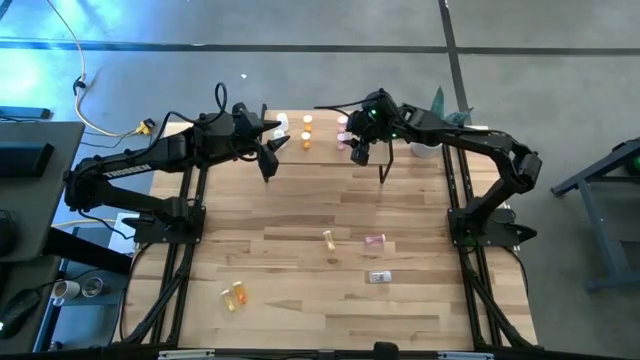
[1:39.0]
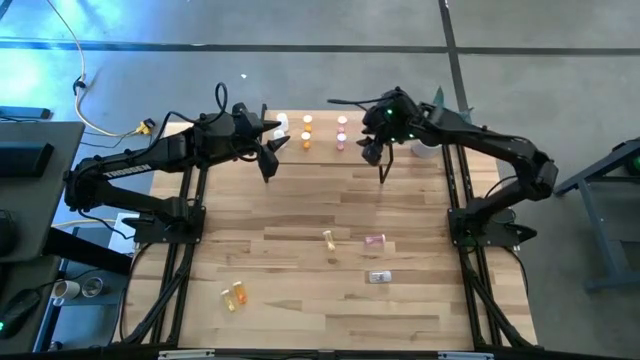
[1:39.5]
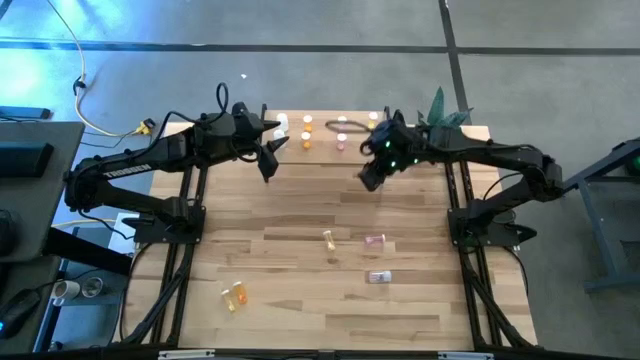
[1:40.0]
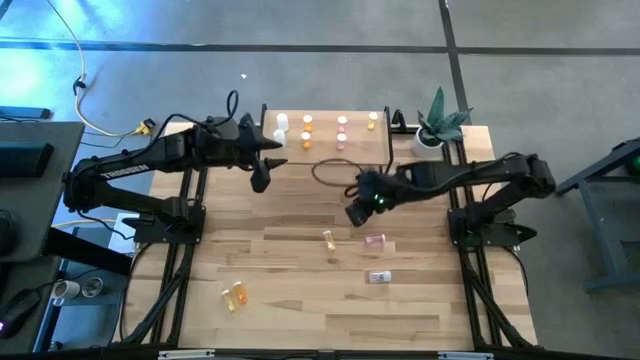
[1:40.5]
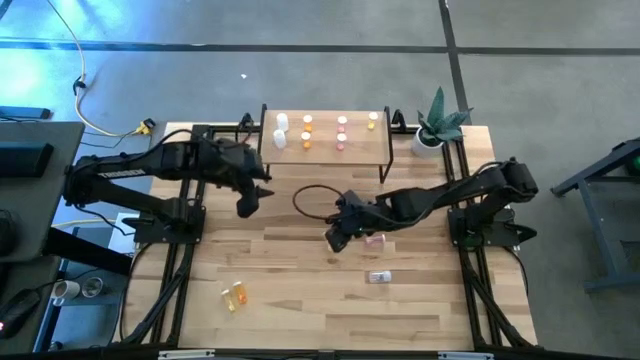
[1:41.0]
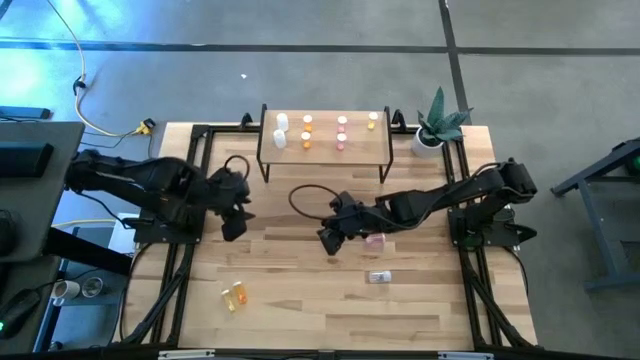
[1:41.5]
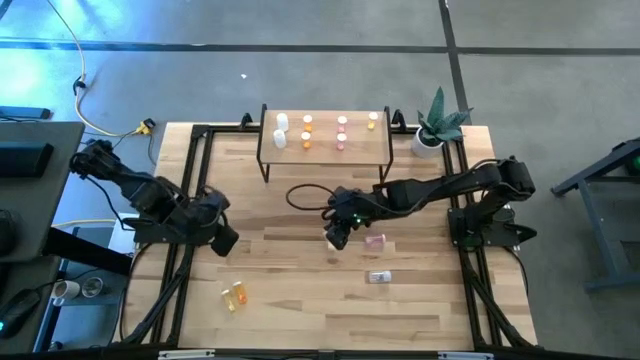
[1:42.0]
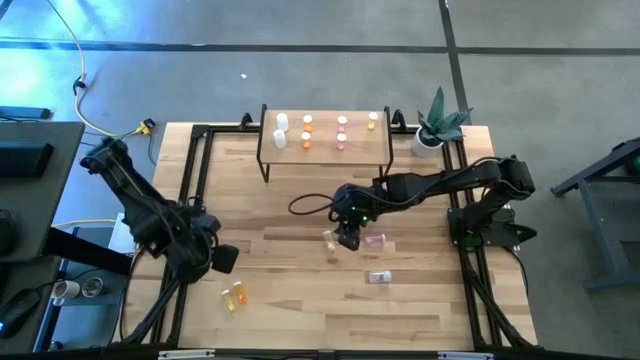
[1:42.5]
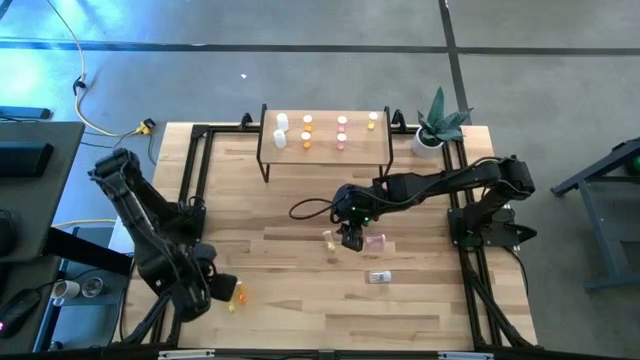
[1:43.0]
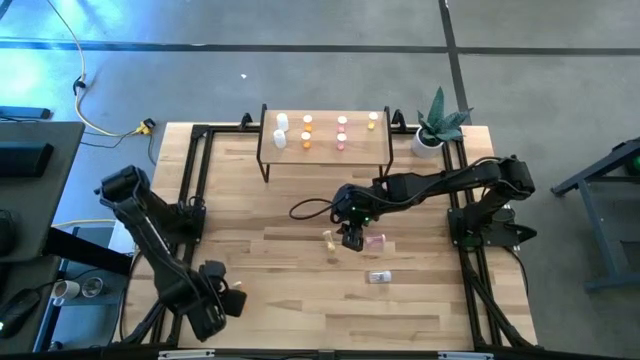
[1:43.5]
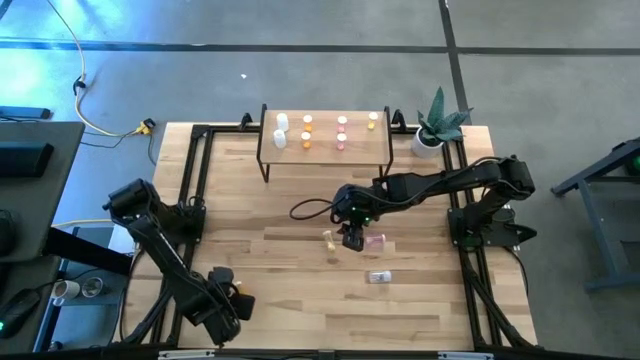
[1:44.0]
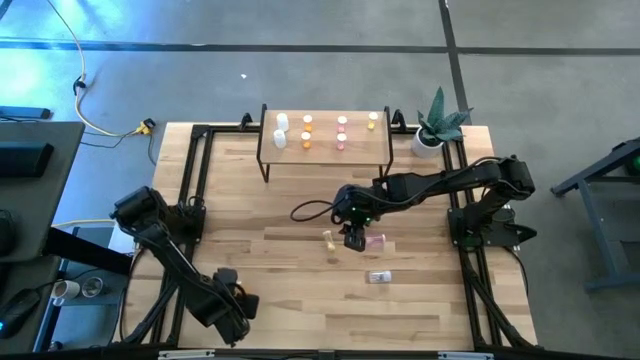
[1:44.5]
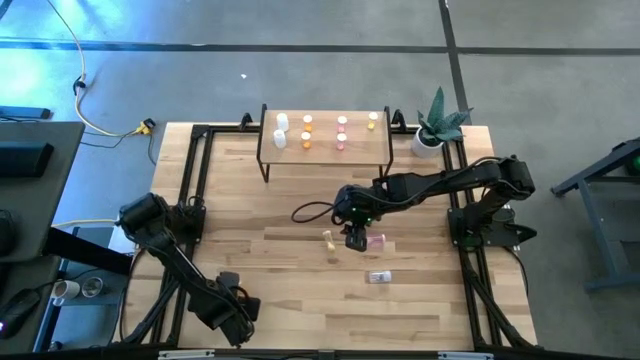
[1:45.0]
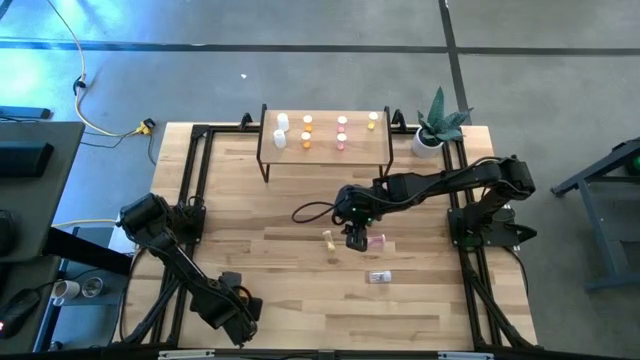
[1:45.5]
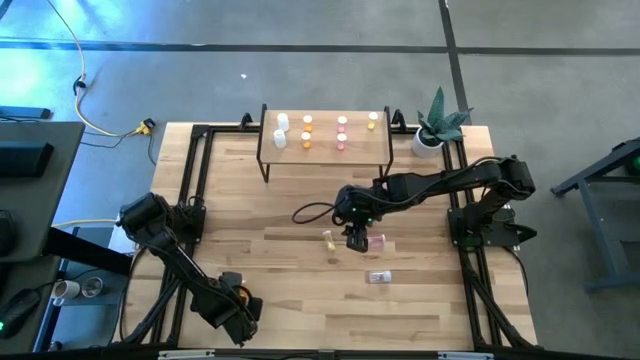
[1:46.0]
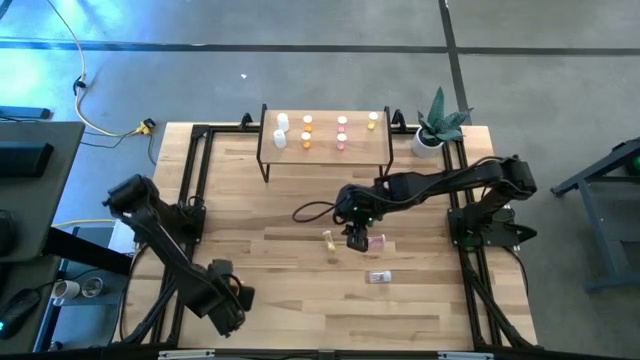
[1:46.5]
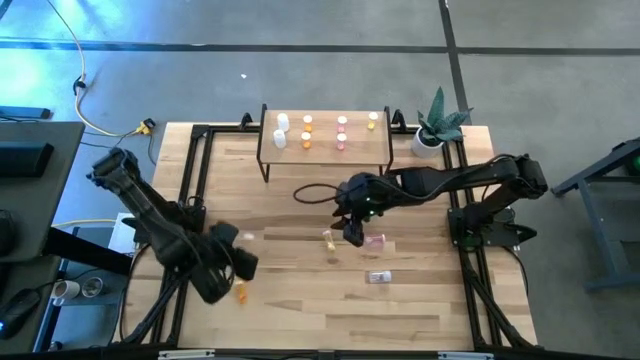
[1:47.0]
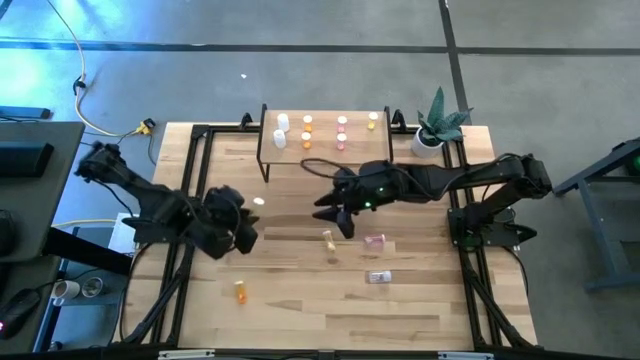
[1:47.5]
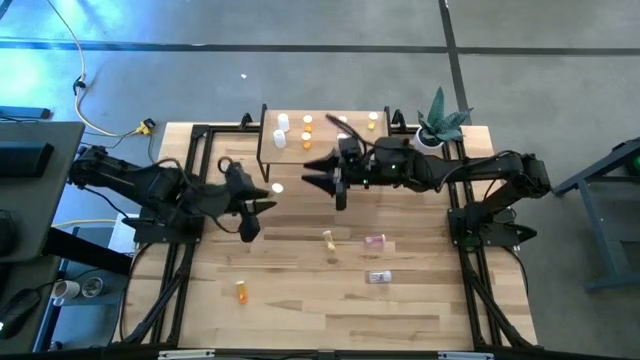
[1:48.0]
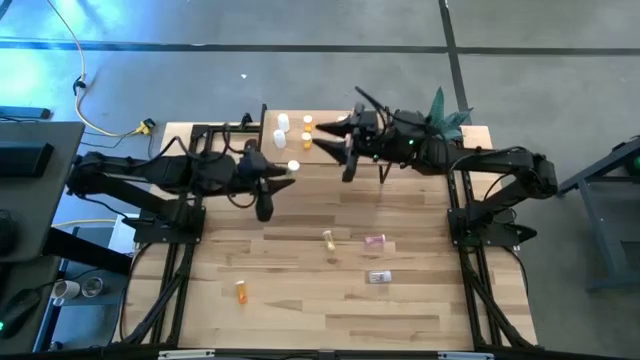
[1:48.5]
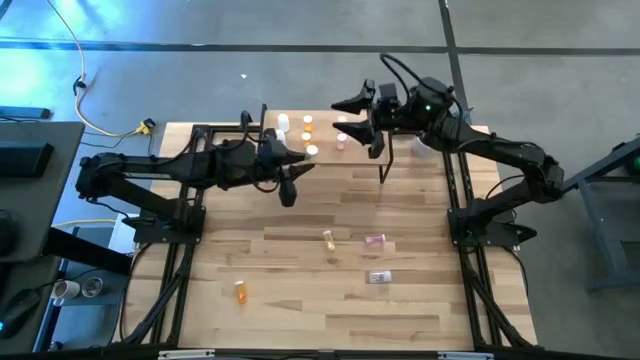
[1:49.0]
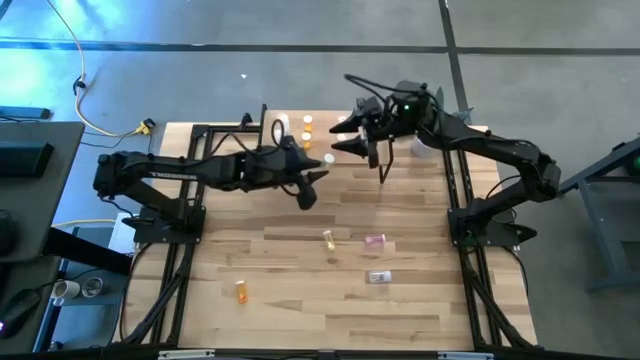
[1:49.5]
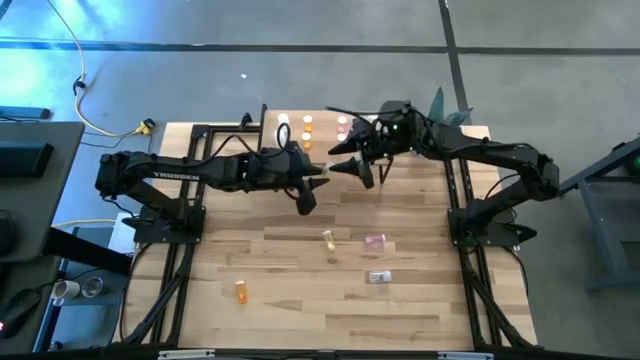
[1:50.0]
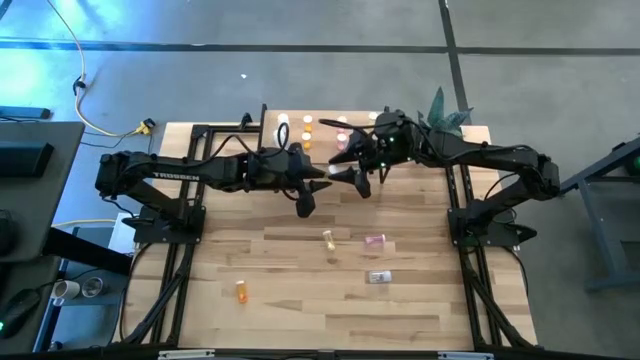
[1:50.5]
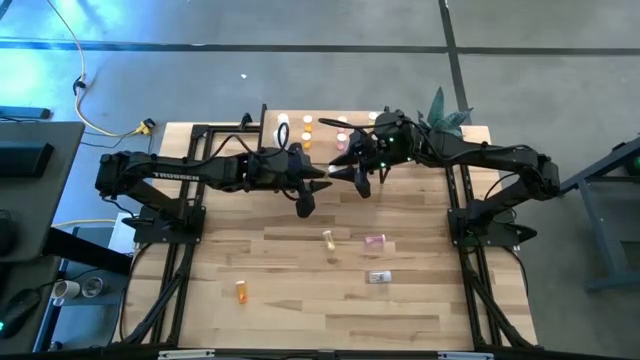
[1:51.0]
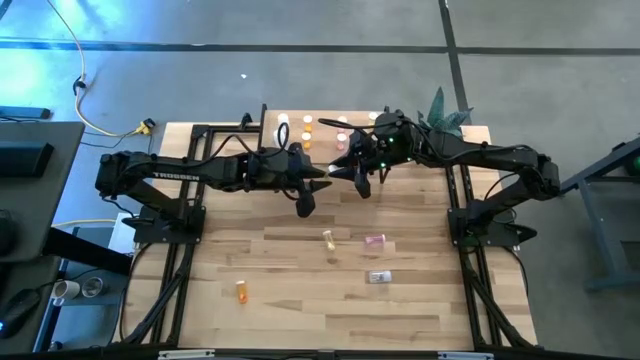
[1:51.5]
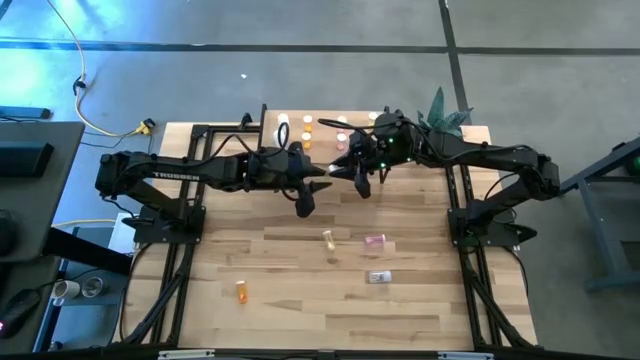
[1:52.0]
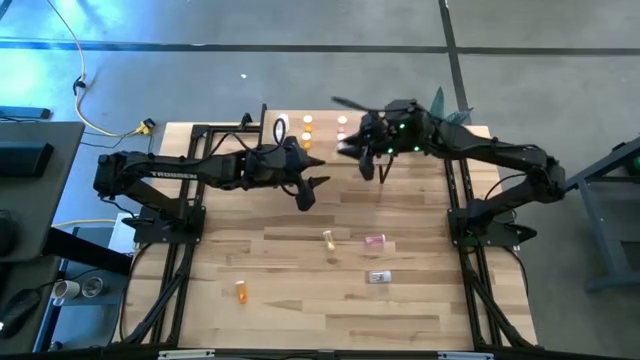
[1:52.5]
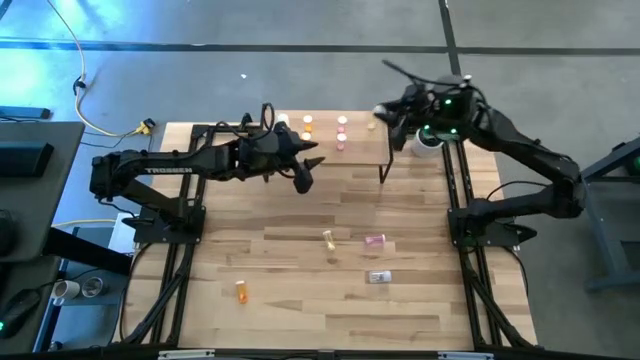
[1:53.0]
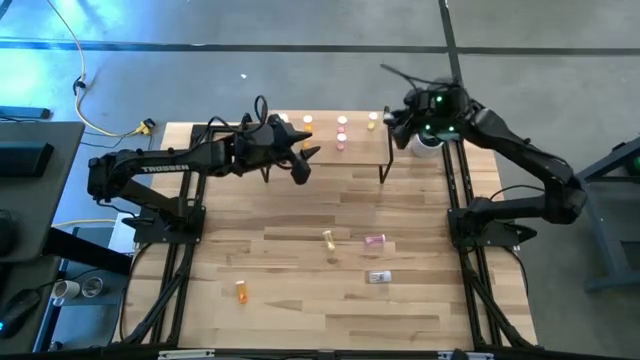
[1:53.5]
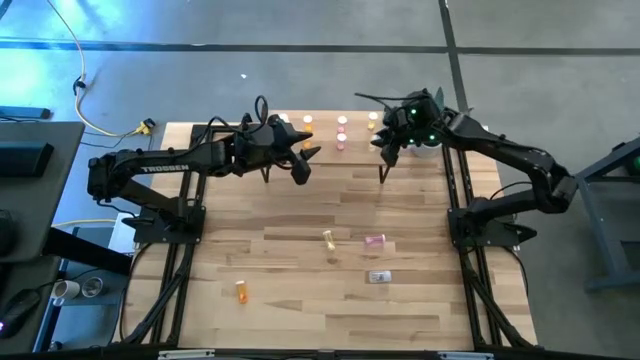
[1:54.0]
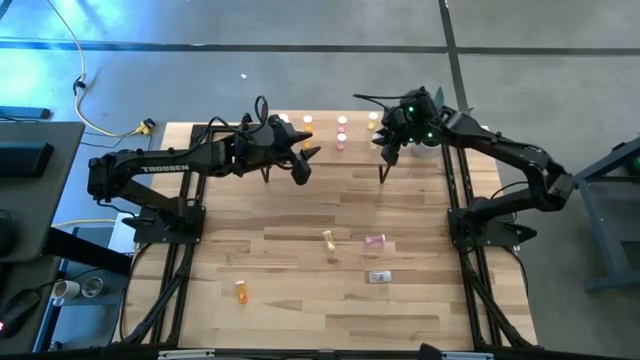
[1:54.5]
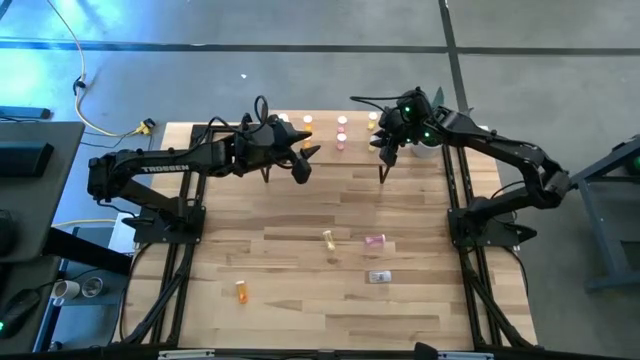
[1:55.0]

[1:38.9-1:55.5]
Task: Pick and place medicine bottles onto shelf by color
Put the bottom yellow pill bottle aligned with the other yellow pill bottle on the shelf

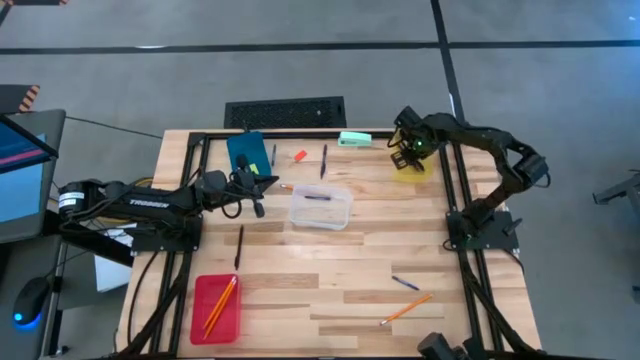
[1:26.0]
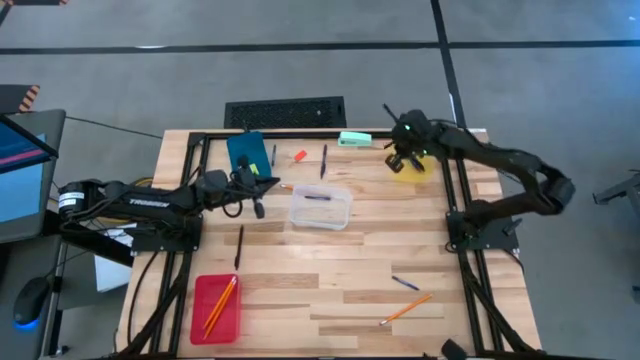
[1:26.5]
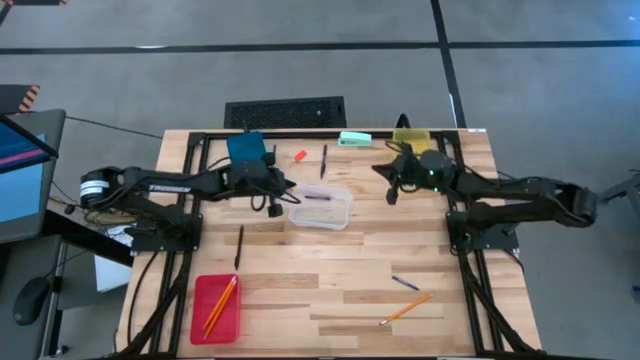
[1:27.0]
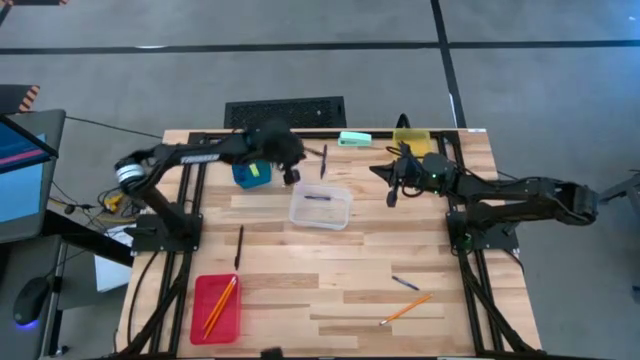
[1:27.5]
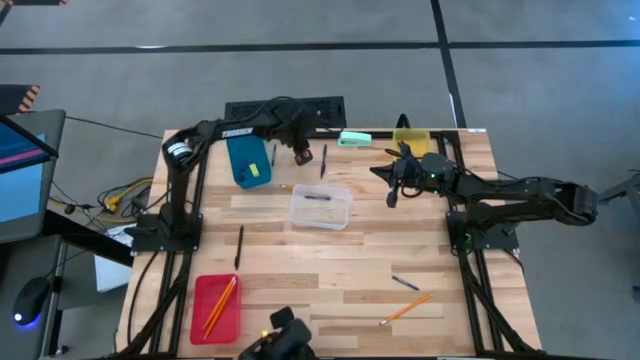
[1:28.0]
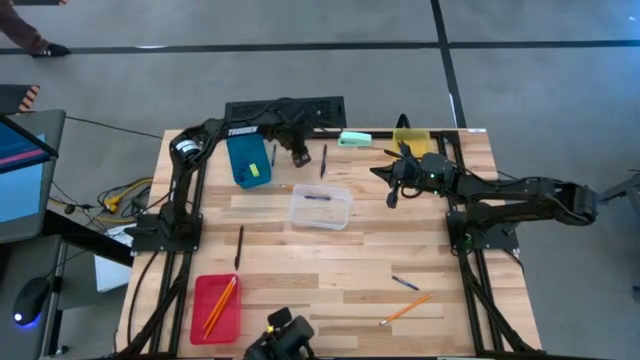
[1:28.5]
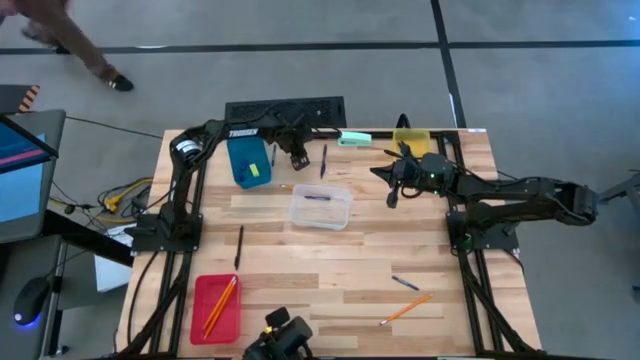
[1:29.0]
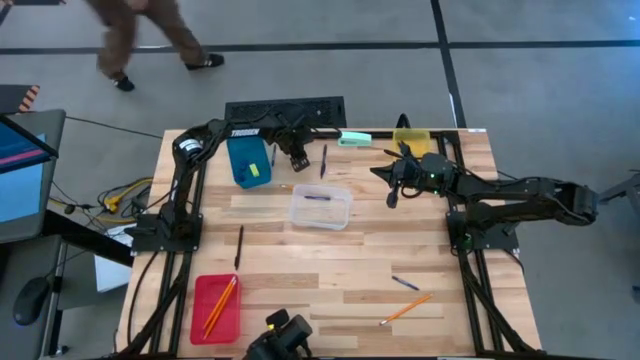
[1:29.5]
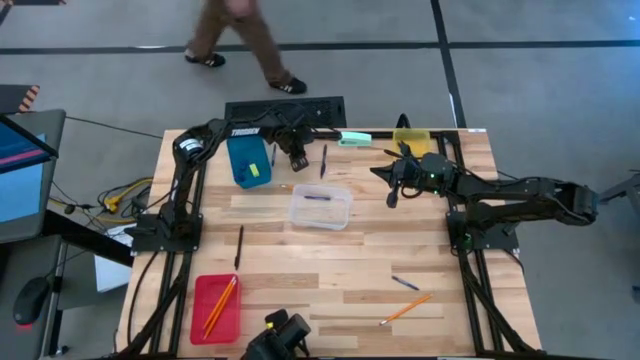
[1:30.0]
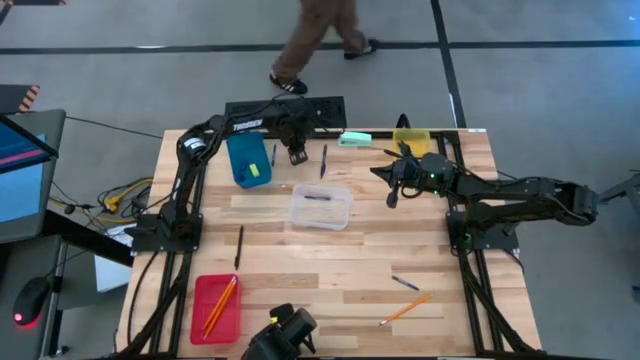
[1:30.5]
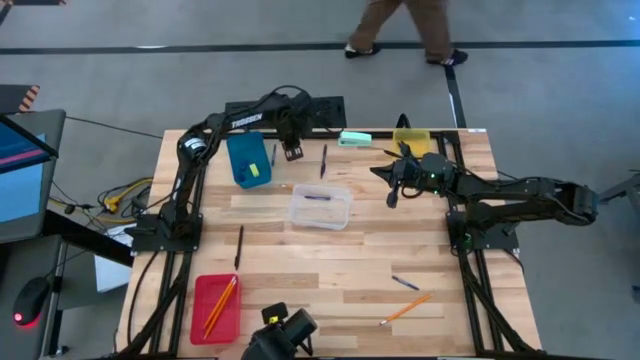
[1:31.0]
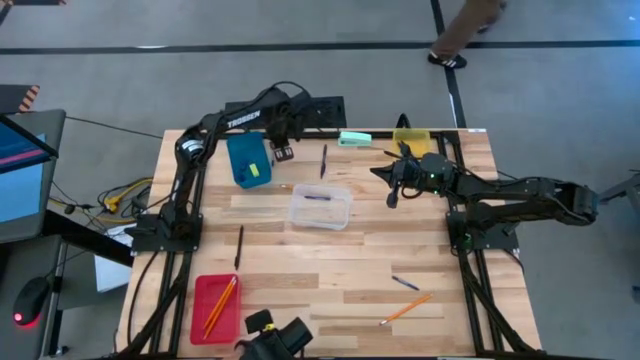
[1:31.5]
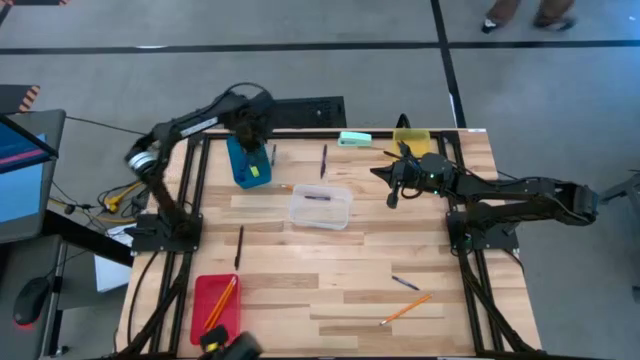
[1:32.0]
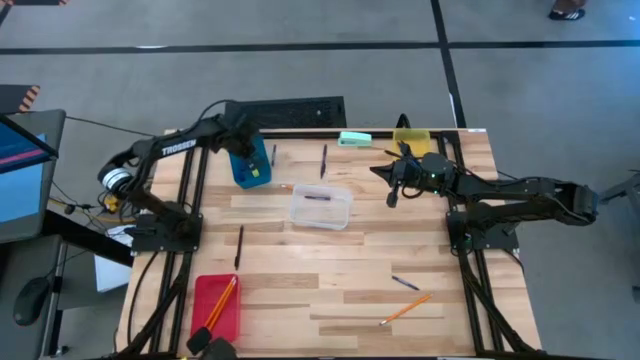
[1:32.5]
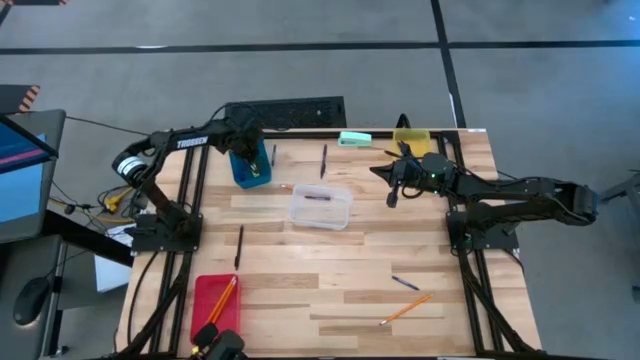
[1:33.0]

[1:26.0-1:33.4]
Task: Sort crayons/erasers/pens/pencils in bins
Put the orange eraser into the blue bin
